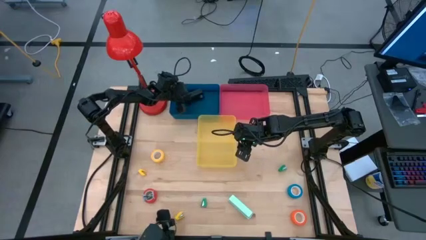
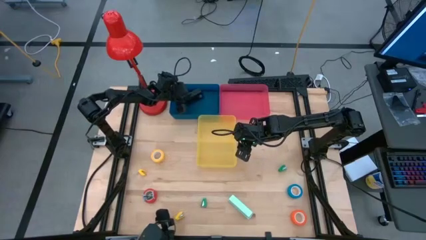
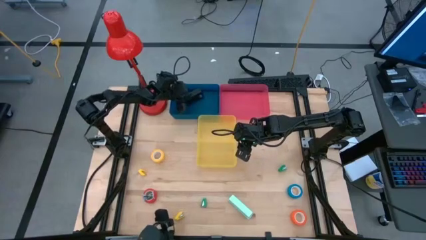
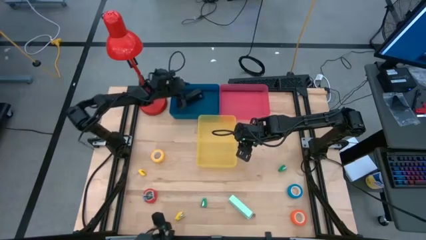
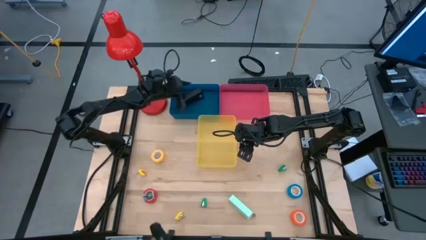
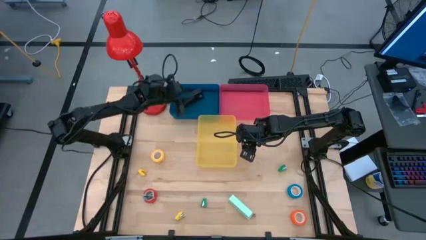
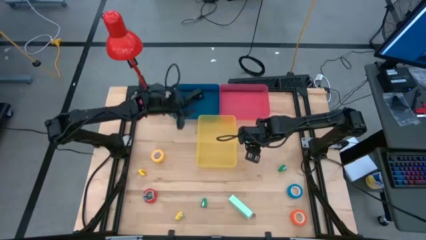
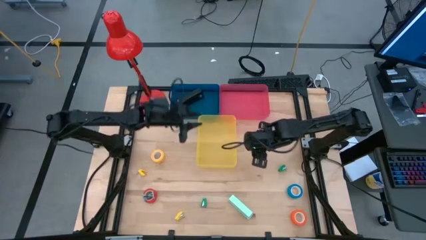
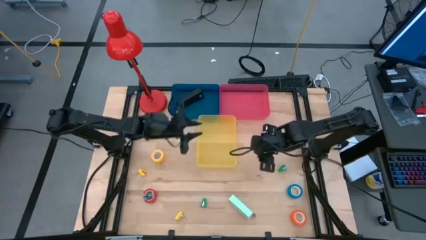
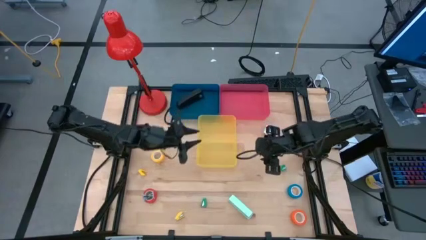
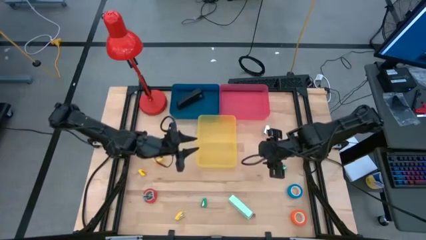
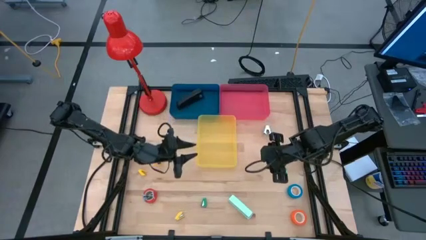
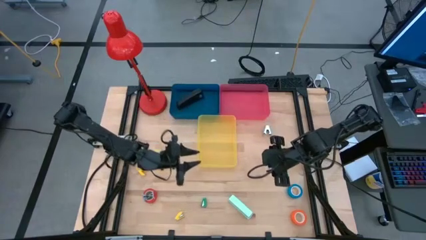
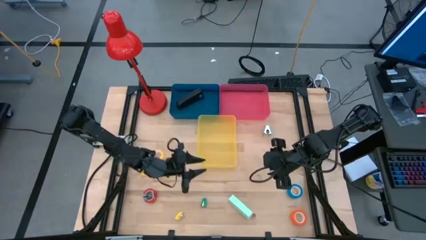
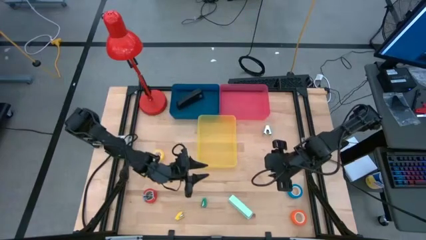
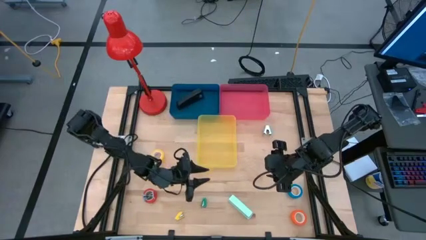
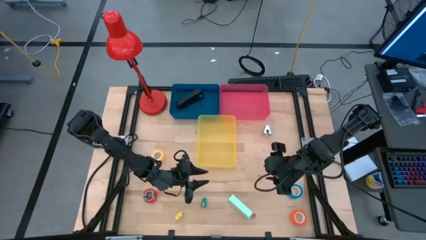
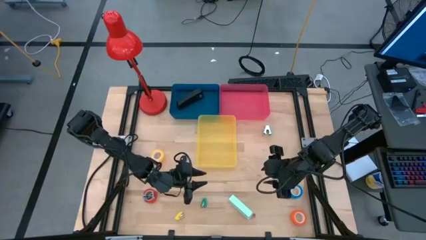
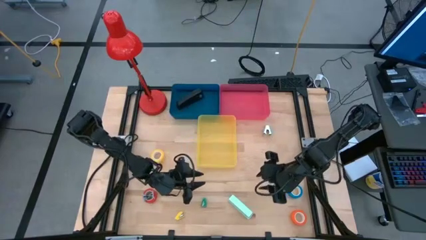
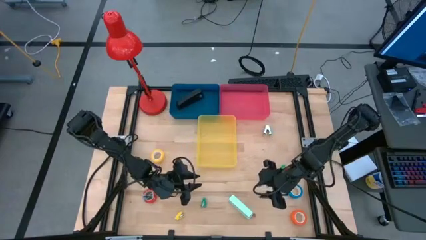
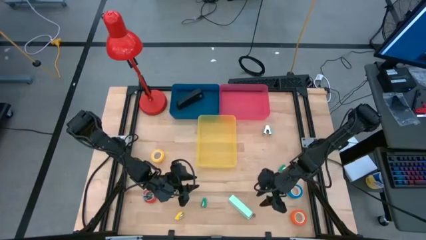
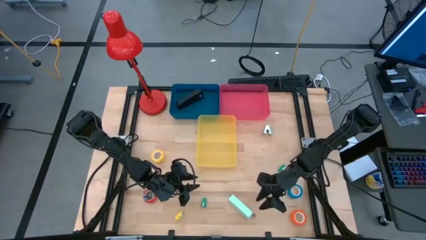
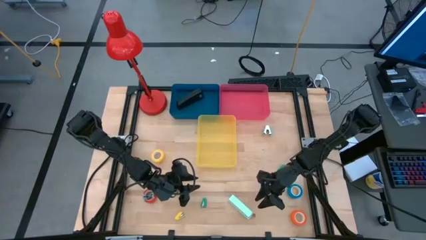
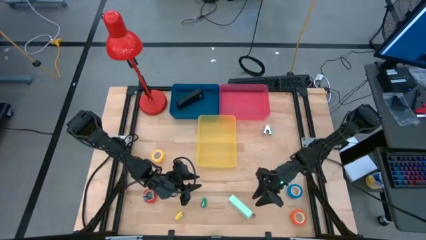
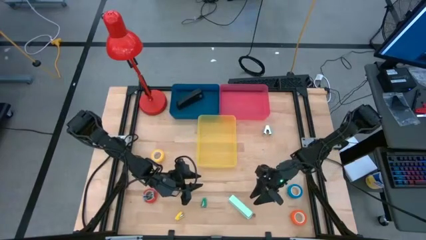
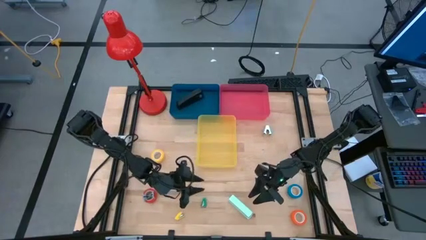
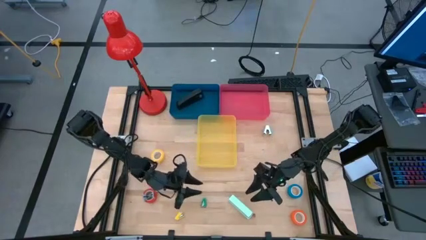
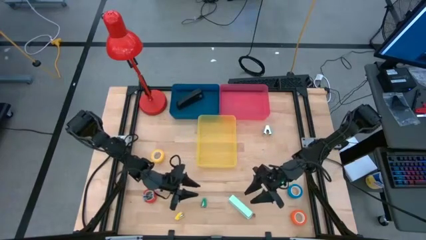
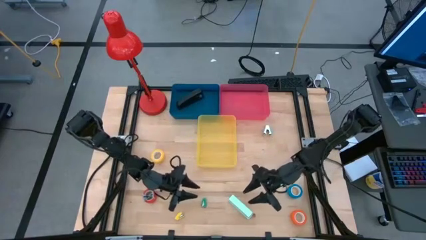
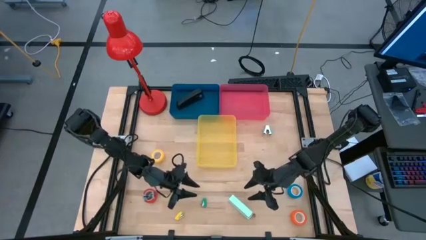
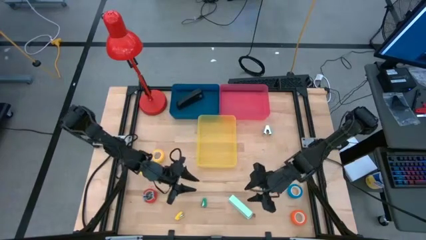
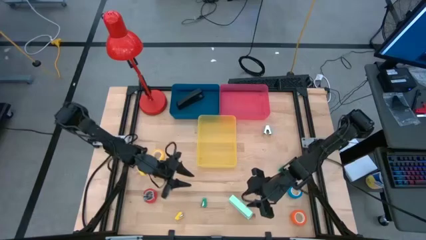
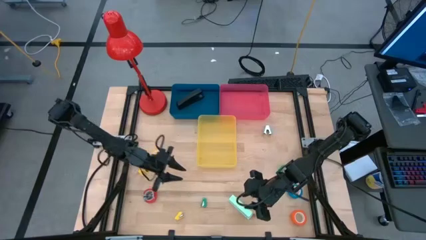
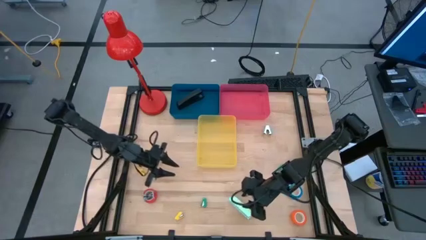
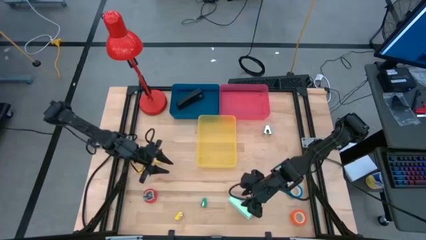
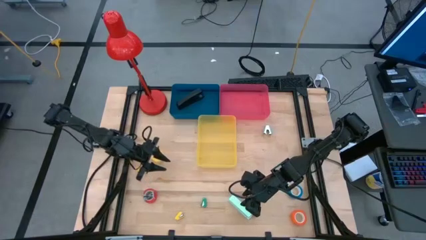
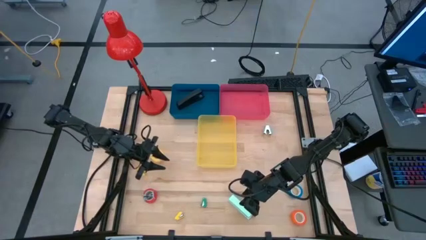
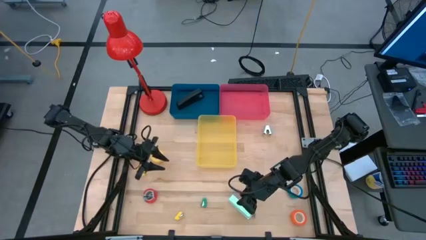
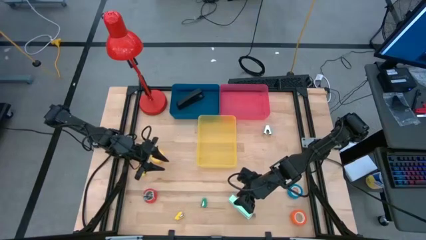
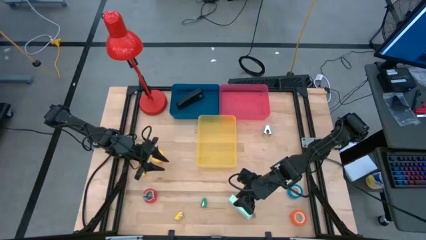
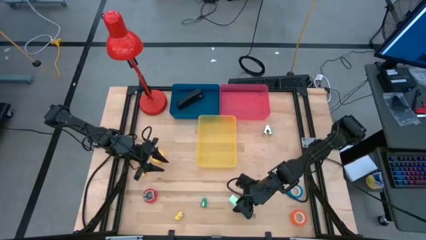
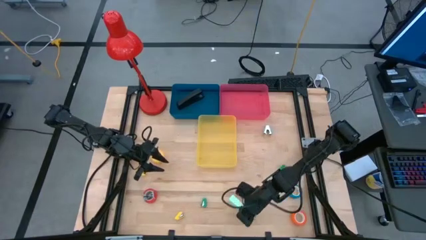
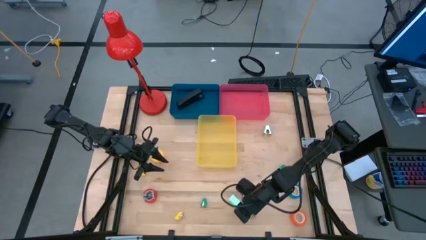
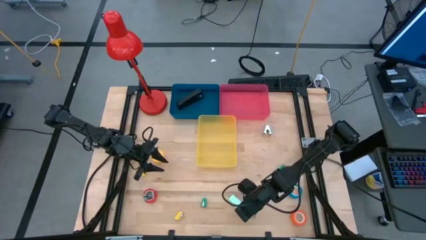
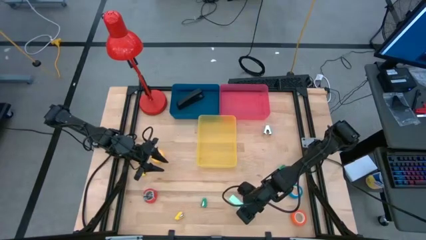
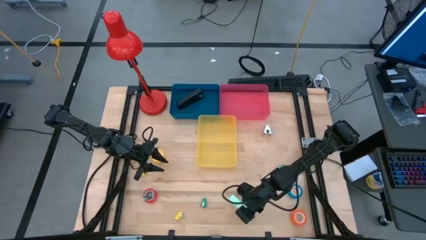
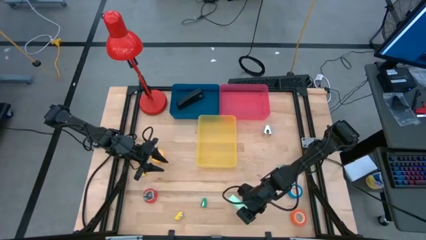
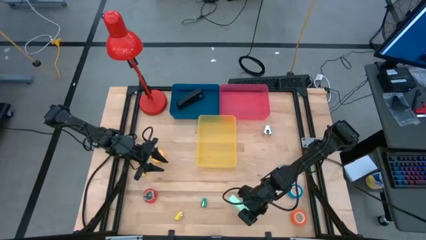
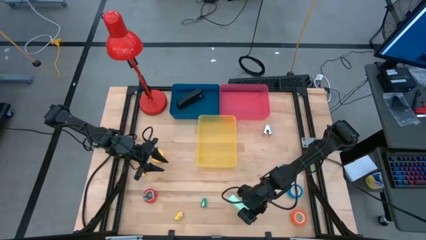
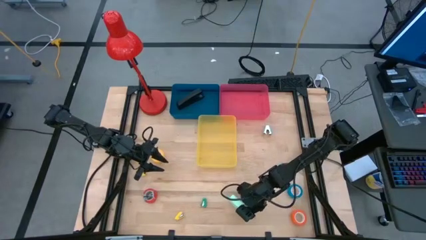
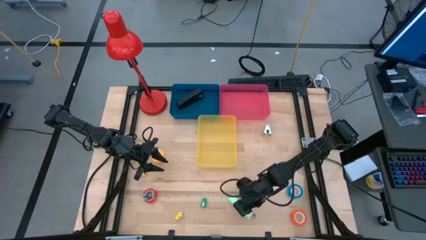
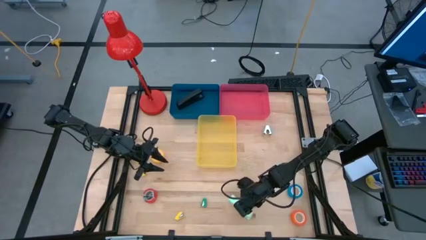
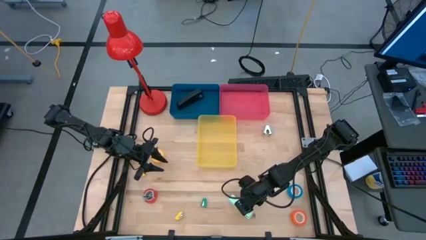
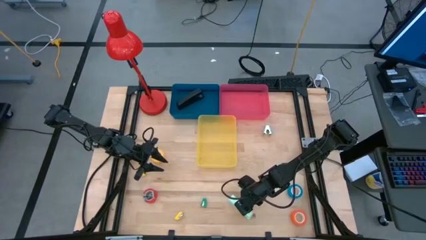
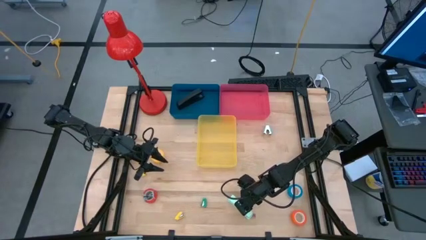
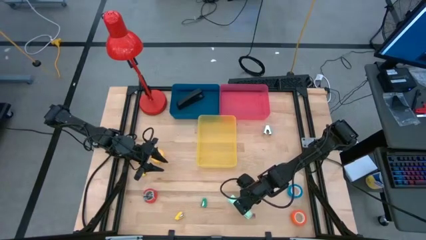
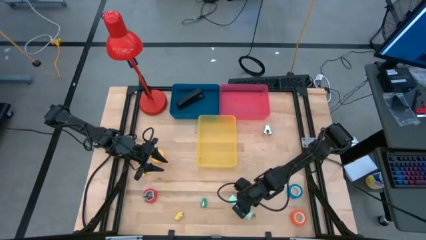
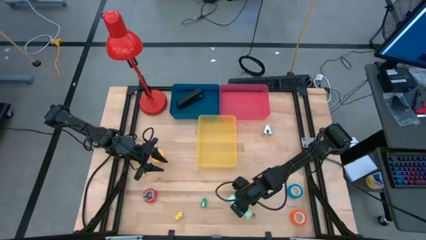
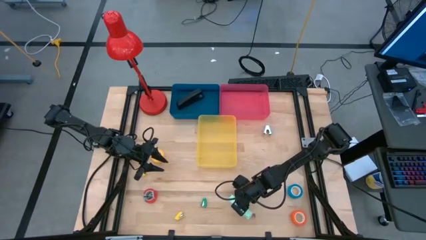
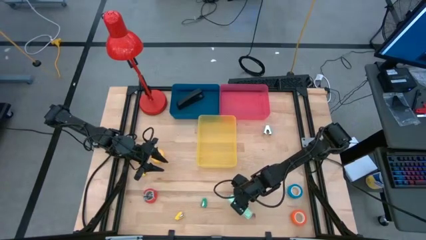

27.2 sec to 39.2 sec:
Task: Pick and place Stapler, Stapler remover, tape
Put the light blue stapler into the blue bin
